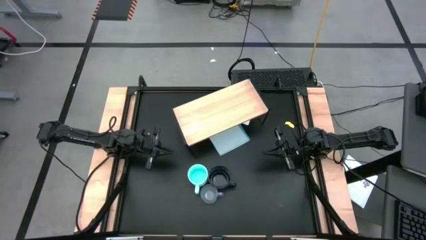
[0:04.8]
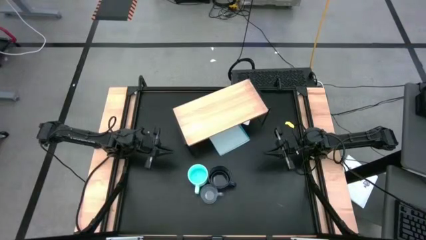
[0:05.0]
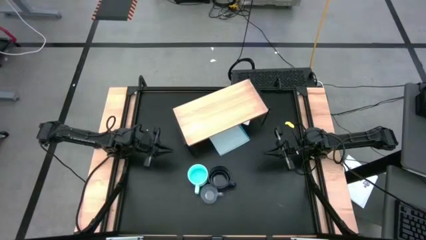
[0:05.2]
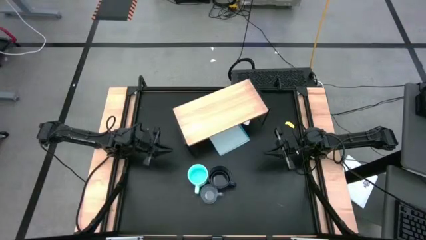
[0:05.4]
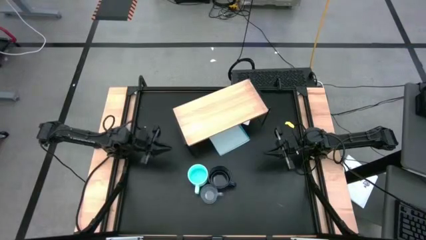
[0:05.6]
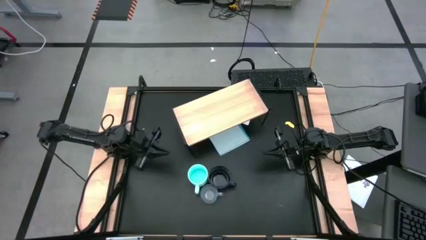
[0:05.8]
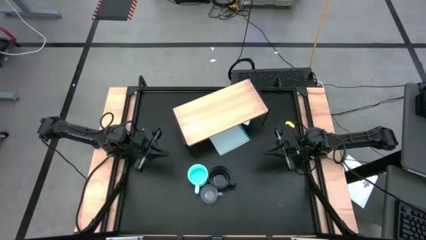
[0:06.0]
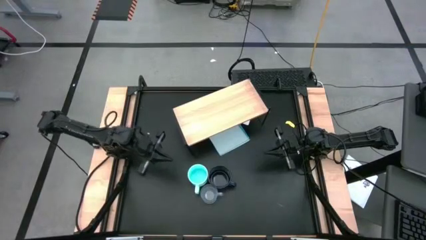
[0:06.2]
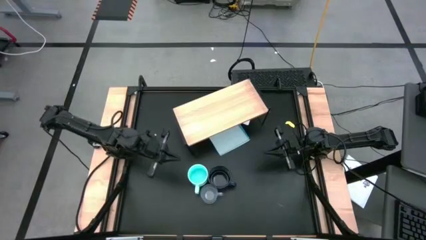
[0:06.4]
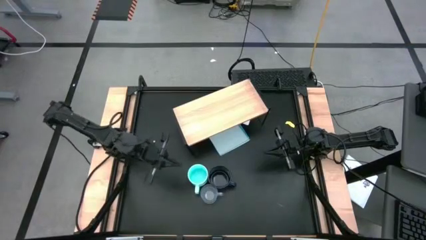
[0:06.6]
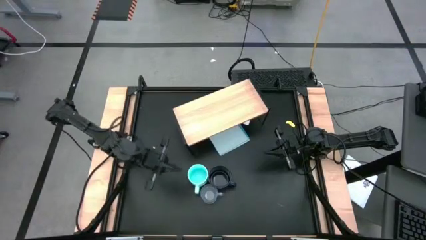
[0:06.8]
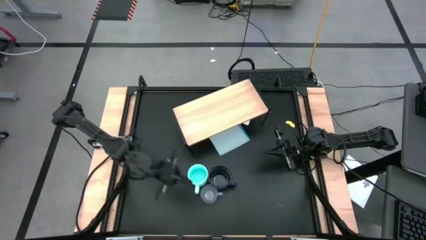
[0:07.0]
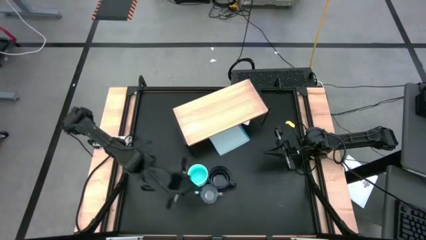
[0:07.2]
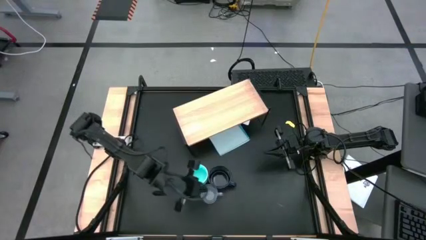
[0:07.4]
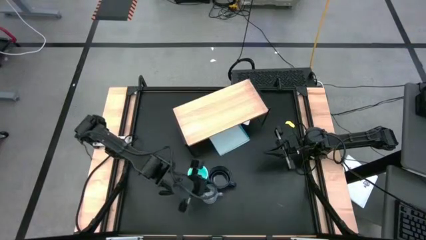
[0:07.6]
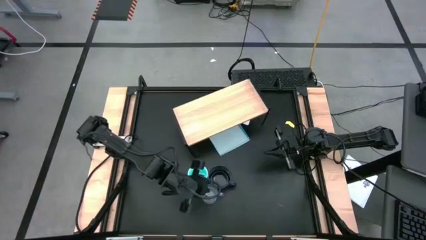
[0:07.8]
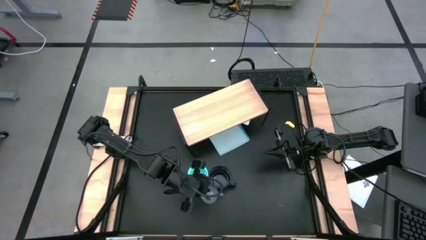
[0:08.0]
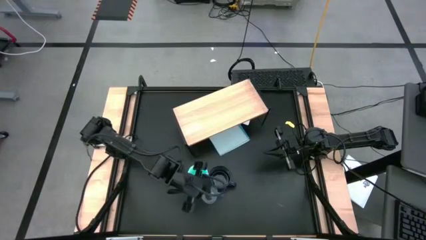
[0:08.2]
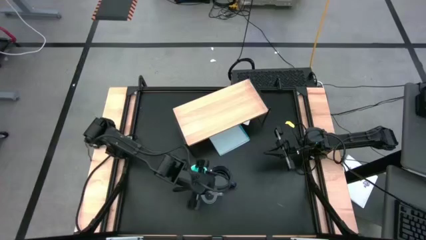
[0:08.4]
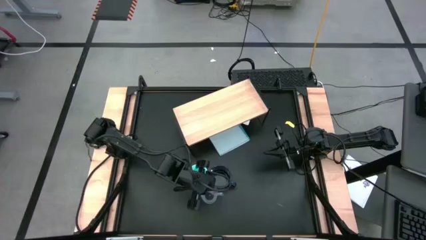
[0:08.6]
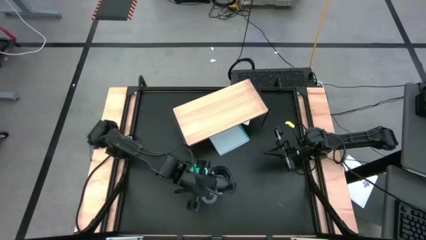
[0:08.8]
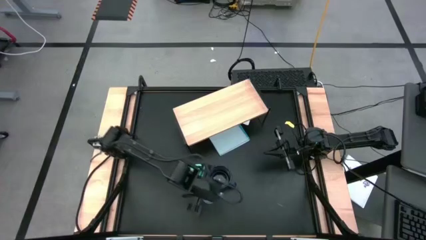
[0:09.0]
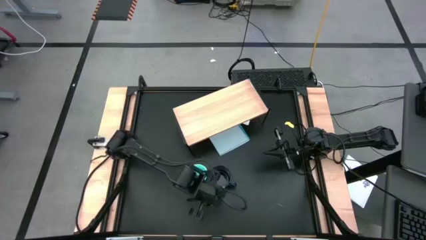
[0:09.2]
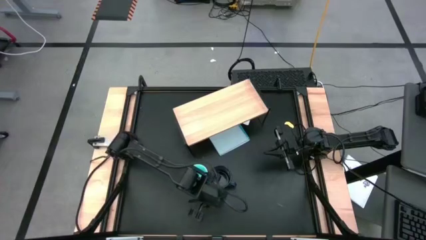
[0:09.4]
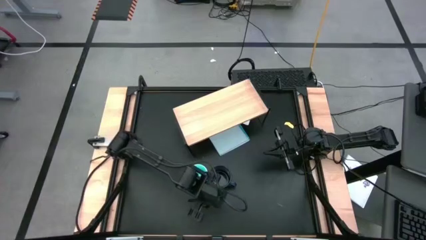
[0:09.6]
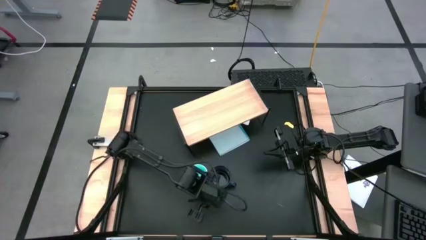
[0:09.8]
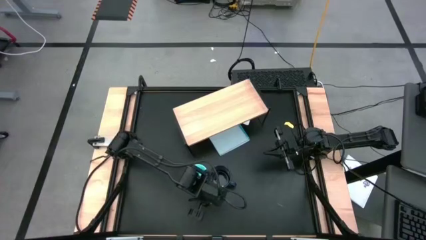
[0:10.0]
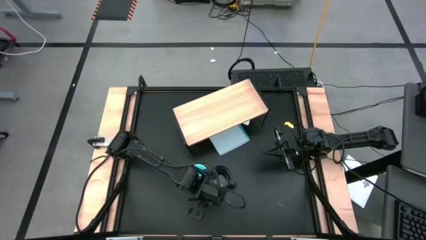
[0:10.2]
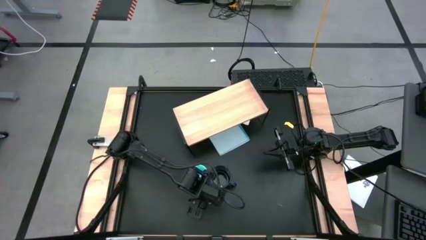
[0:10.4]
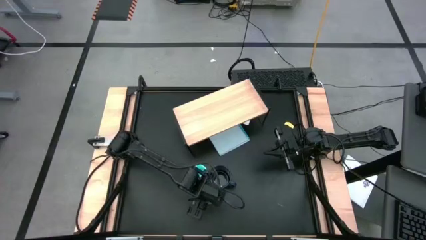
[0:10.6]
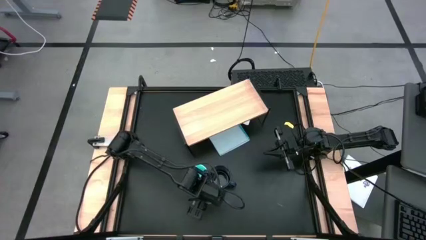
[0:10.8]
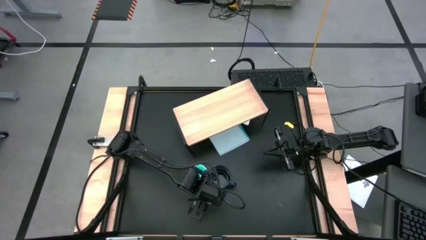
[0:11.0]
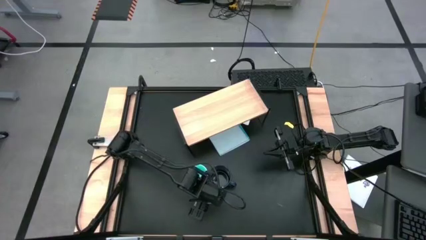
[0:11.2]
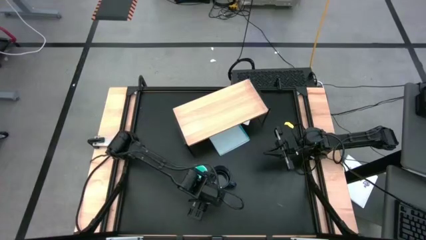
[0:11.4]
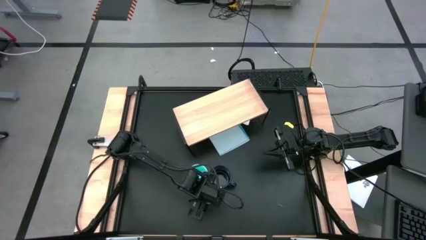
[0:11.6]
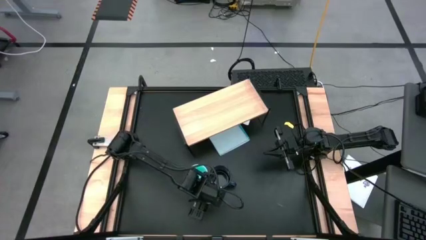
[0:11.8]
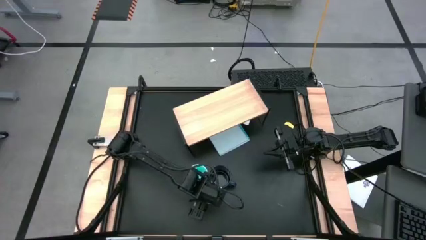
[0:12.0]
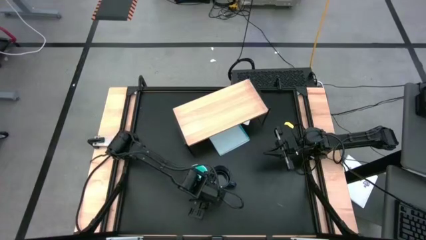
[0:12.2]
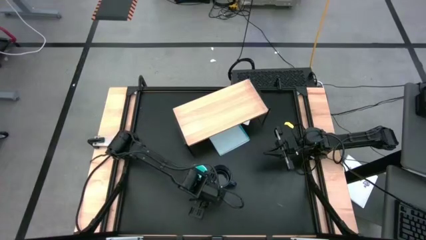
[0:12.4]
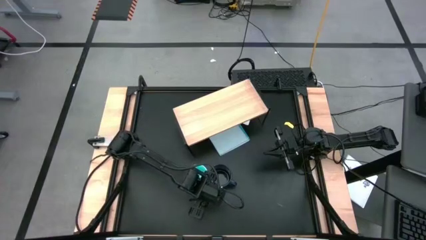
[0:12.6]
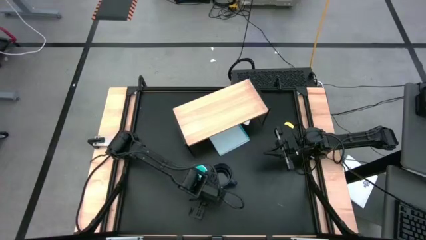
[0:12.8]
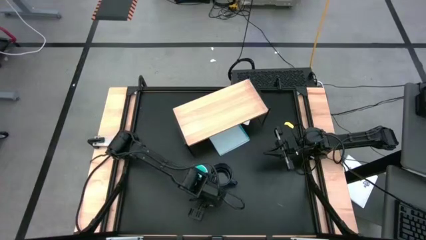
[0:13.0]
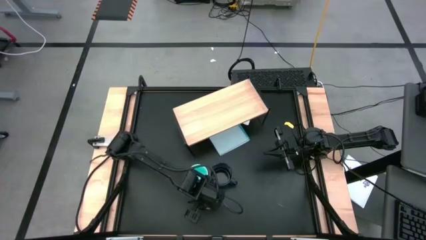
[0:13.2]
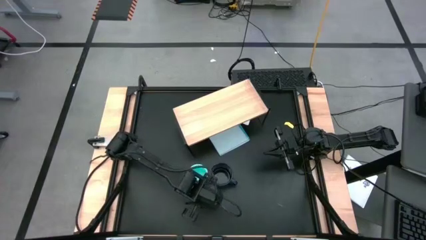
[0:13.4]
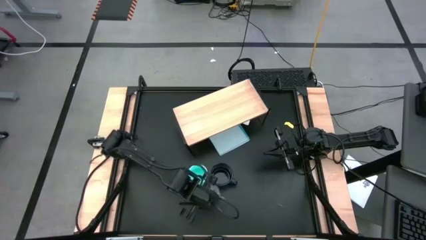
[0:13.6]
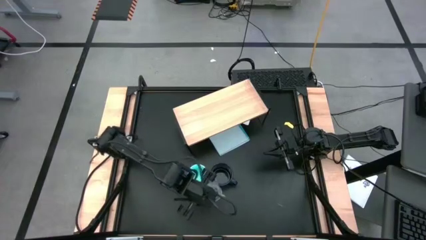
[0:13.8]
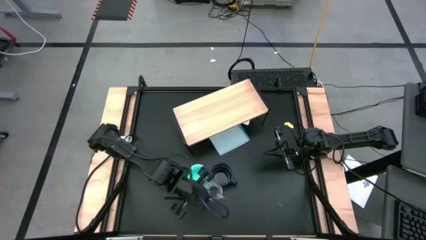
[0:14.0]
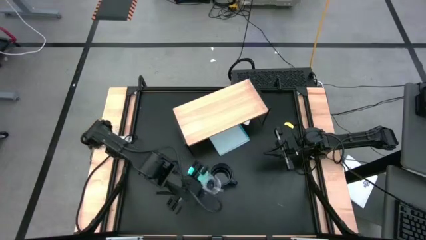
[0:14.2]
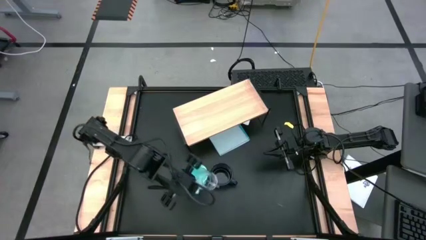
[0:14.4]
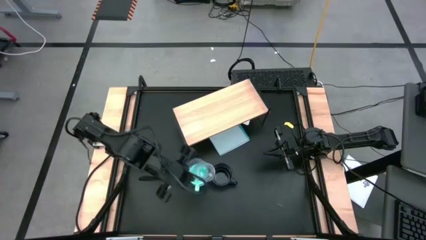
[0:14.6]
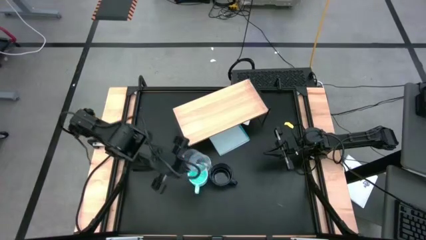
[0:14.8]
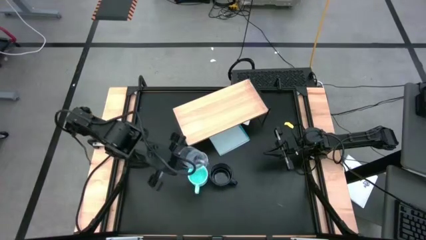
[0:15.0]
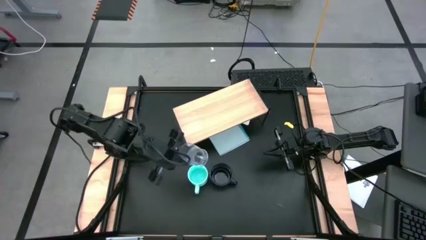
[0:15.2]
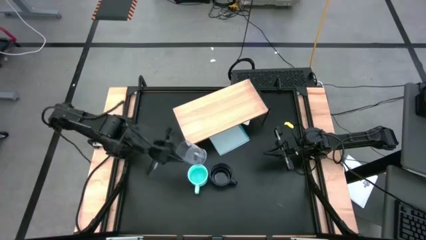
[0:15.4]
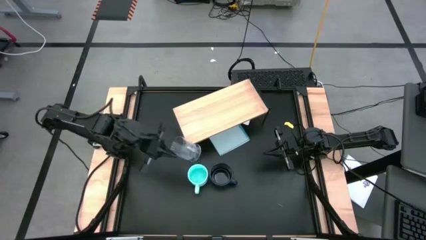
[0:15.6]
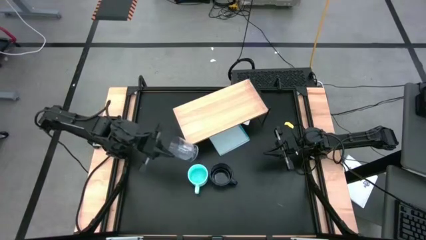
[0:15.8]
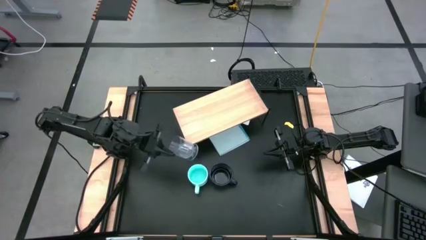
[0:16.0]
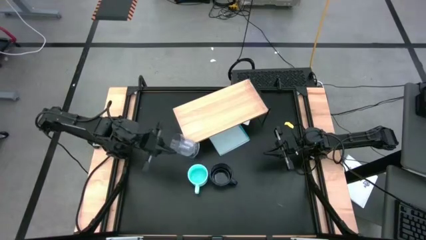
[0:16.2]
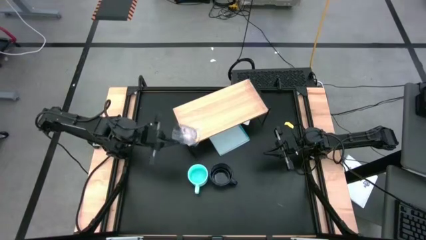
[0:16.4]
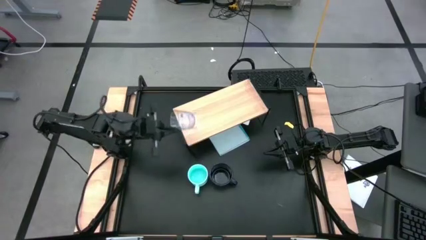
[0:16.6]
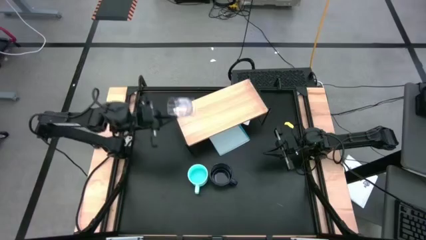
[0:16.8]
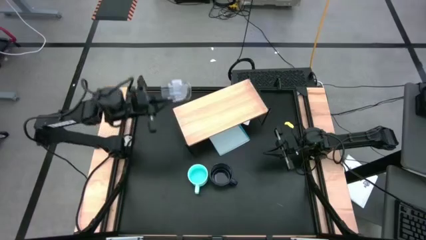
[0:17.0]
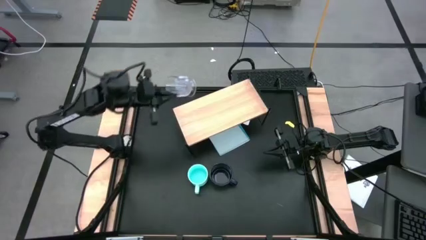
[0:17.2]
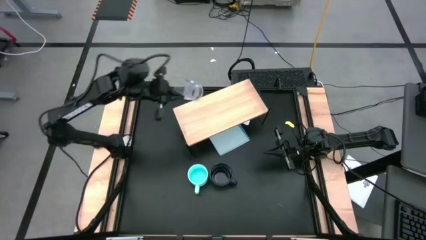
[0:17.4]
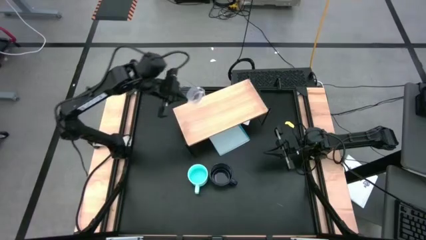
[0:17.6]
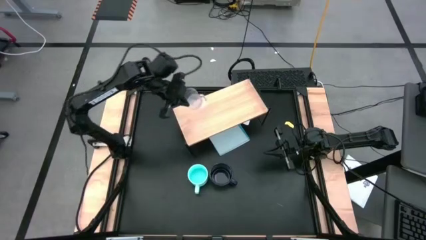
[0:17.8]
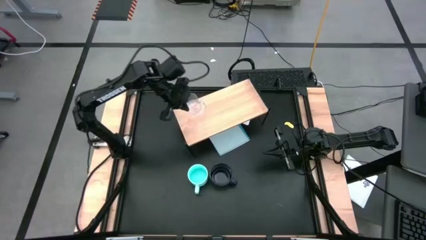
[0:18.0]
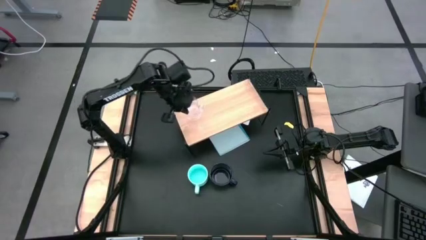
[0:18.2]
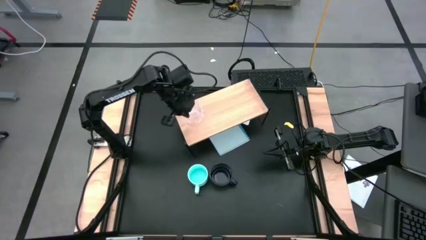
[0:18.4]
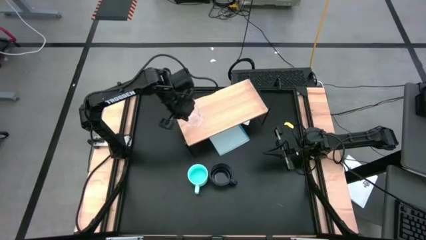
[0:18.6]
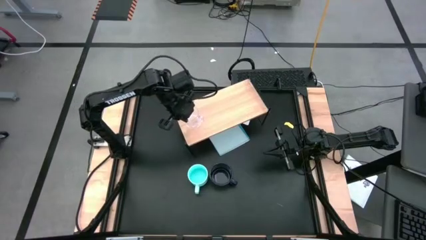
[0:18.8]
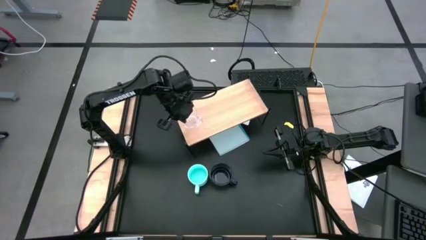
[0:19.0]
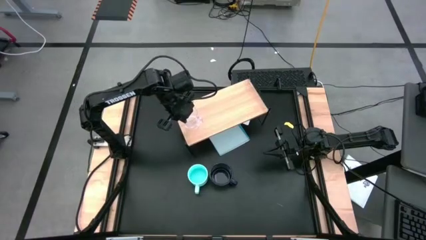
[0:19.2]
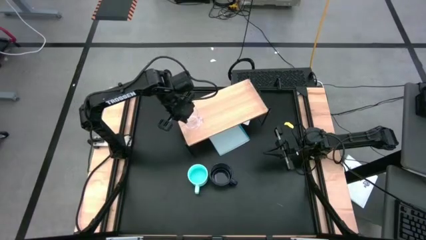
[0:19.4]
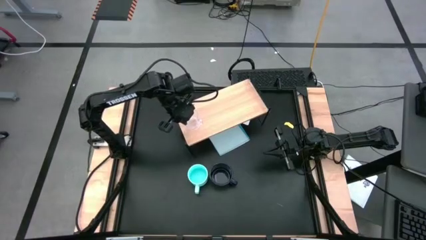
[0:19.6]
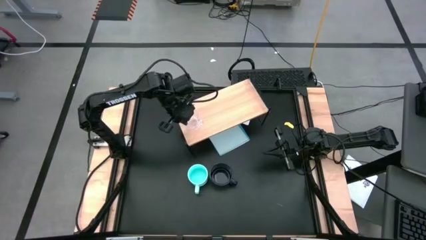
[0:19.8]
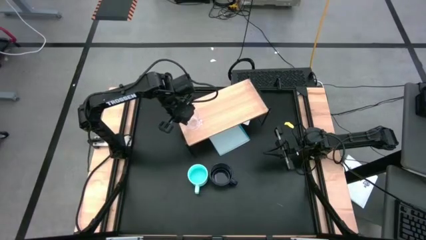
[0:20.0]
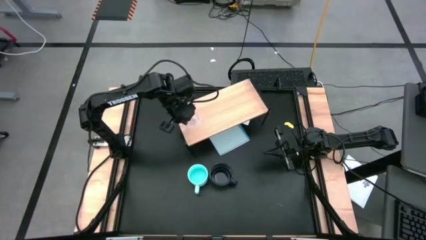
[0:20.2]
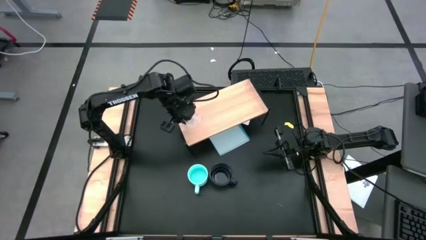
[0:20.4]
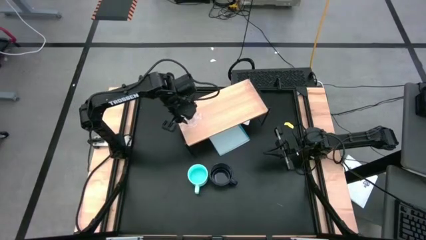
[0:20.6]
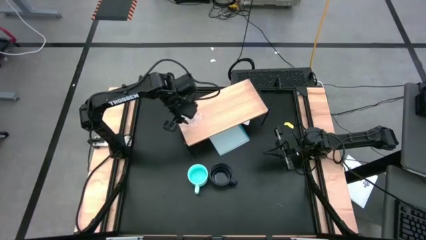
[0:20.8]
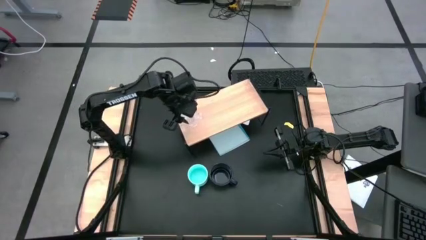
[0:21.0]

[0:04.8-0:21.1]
Task: Stack small to large cups/mugs on shelf
Put the transparent mug on the shelf
